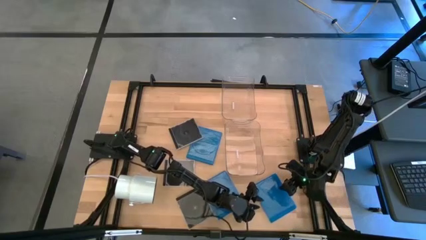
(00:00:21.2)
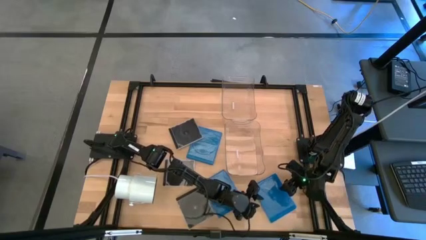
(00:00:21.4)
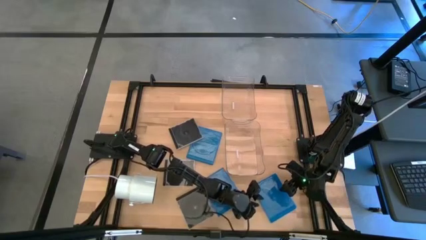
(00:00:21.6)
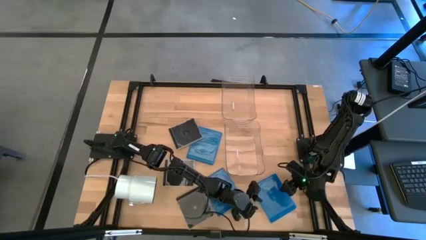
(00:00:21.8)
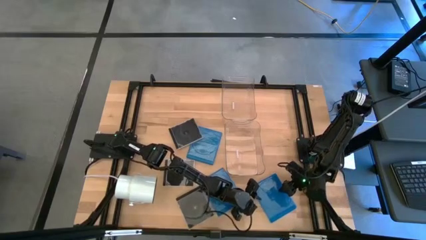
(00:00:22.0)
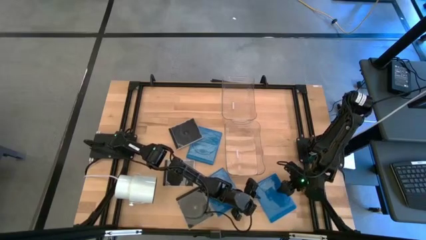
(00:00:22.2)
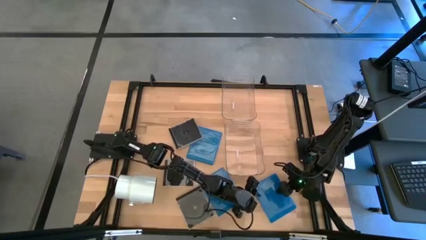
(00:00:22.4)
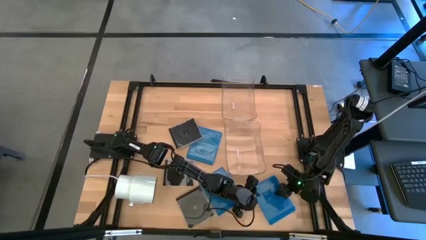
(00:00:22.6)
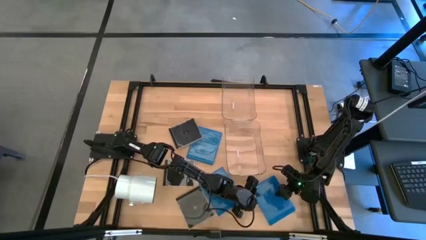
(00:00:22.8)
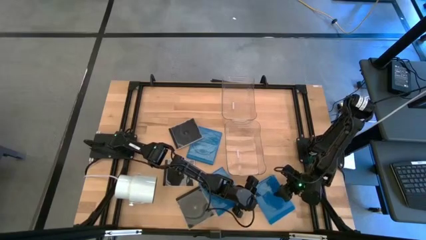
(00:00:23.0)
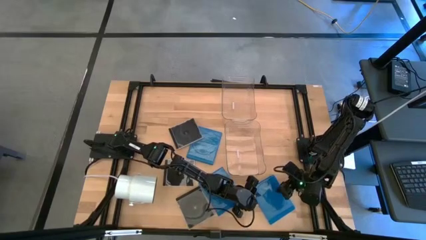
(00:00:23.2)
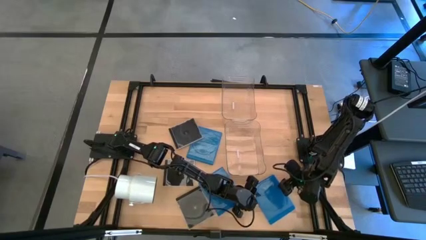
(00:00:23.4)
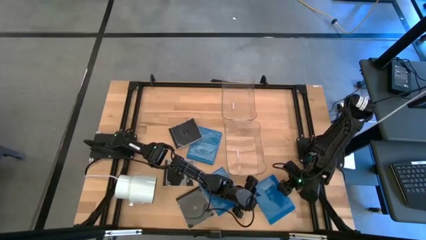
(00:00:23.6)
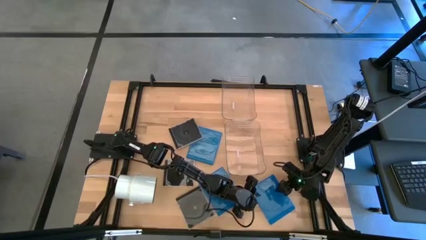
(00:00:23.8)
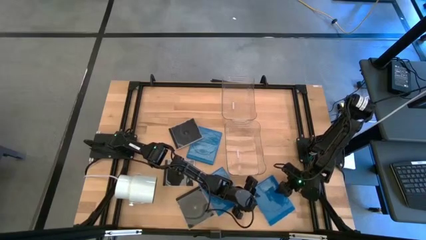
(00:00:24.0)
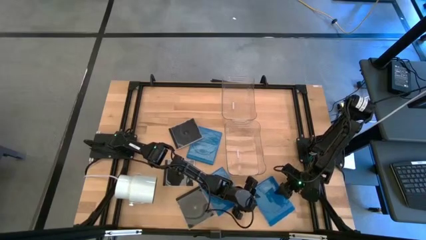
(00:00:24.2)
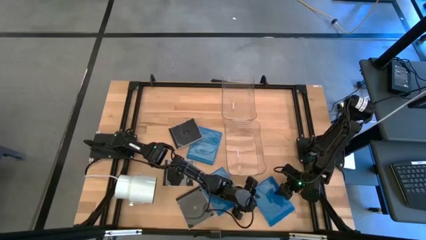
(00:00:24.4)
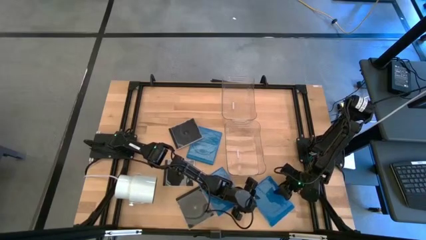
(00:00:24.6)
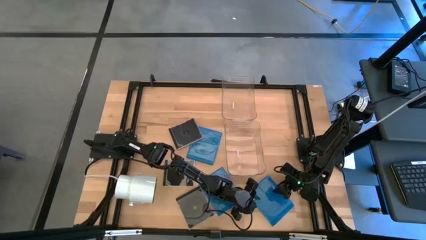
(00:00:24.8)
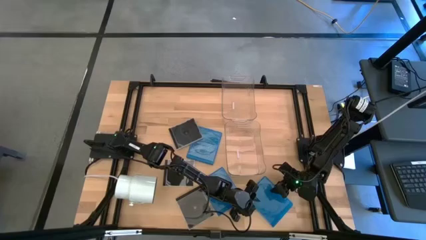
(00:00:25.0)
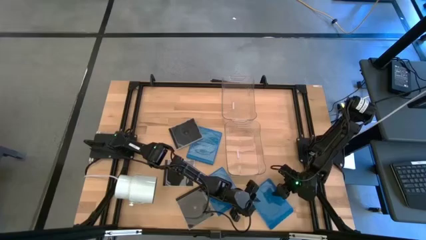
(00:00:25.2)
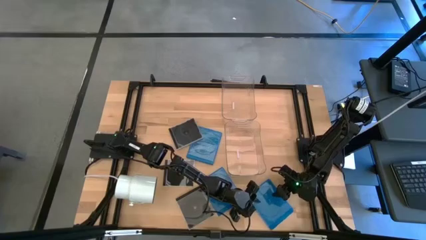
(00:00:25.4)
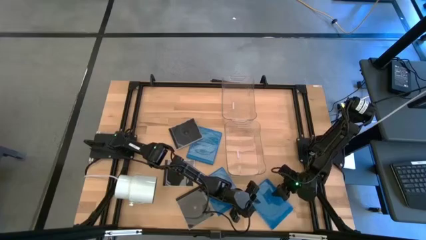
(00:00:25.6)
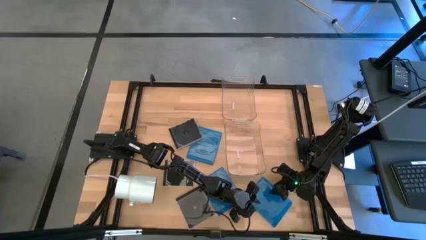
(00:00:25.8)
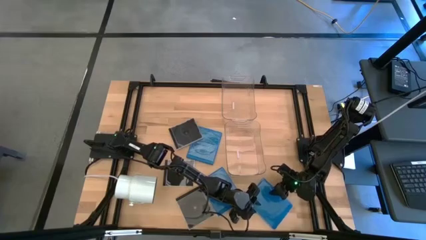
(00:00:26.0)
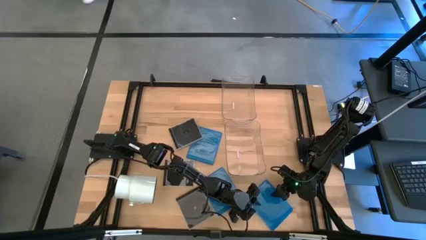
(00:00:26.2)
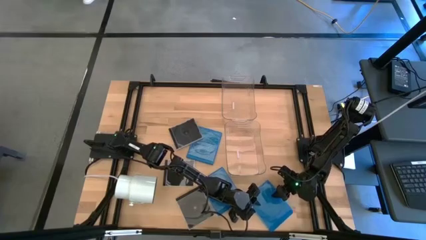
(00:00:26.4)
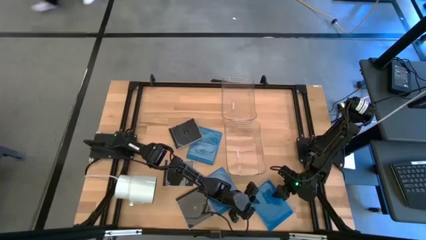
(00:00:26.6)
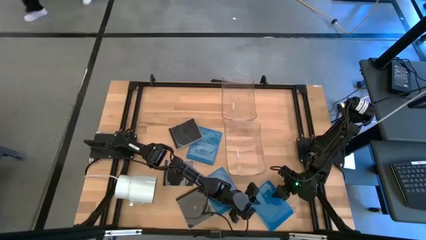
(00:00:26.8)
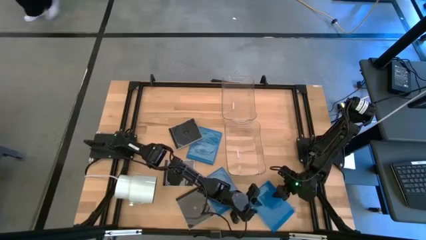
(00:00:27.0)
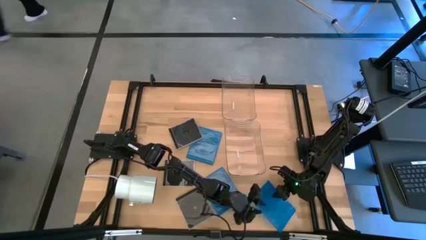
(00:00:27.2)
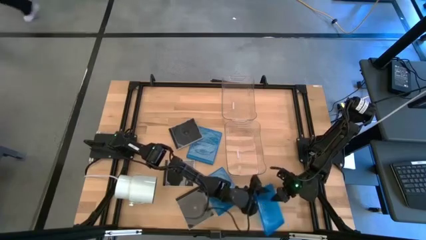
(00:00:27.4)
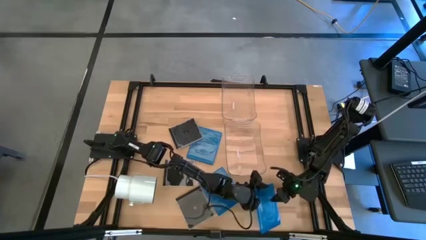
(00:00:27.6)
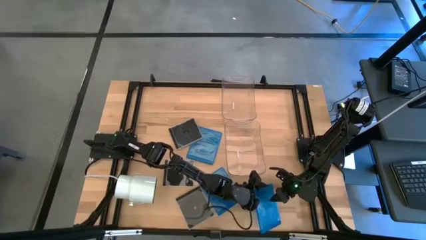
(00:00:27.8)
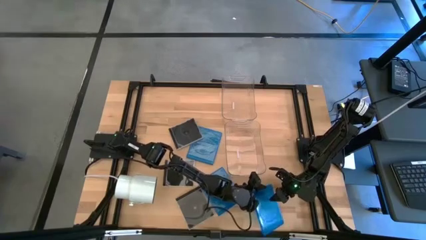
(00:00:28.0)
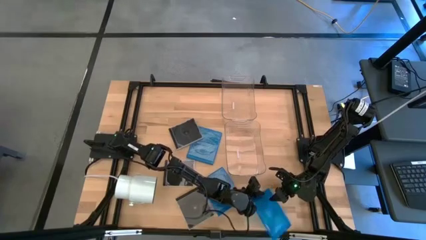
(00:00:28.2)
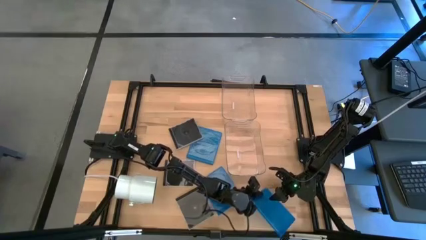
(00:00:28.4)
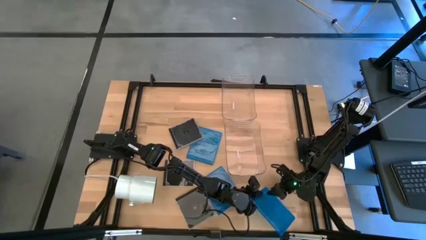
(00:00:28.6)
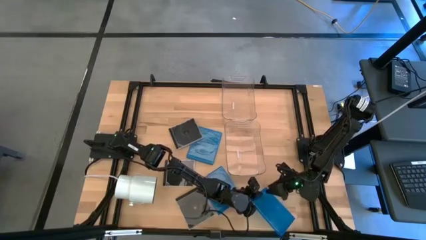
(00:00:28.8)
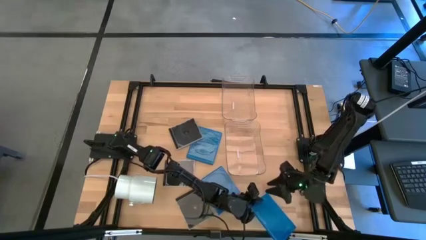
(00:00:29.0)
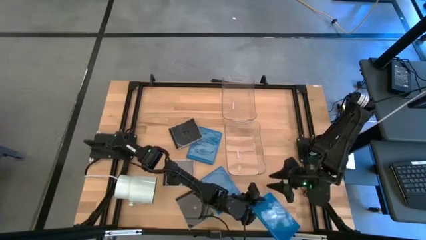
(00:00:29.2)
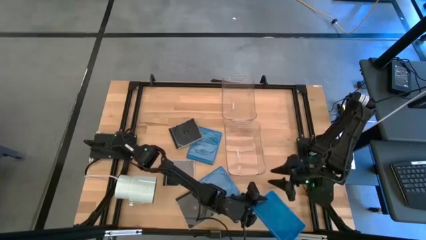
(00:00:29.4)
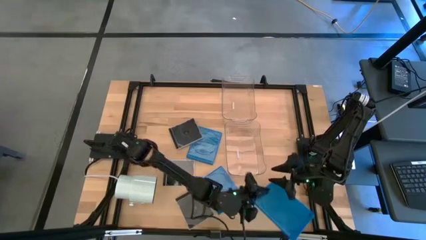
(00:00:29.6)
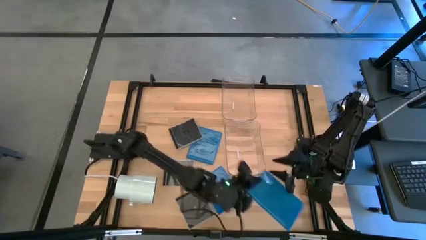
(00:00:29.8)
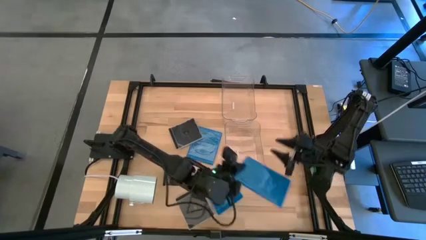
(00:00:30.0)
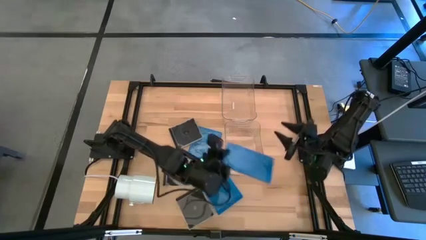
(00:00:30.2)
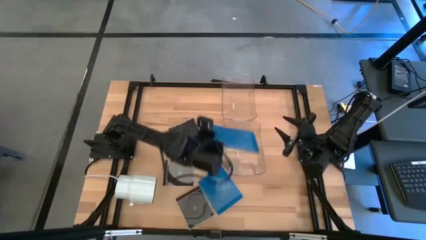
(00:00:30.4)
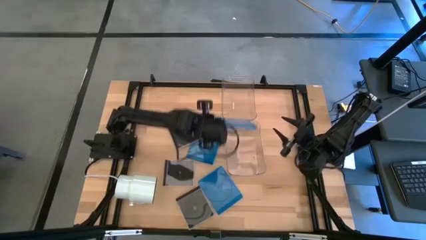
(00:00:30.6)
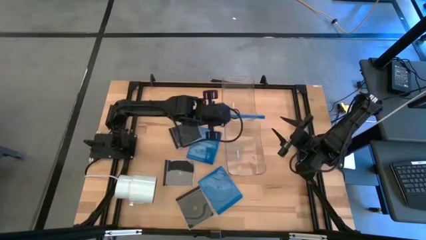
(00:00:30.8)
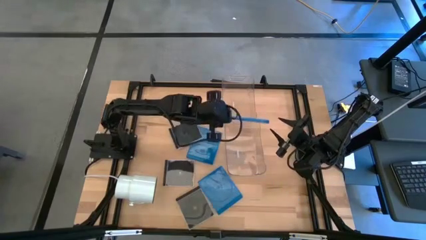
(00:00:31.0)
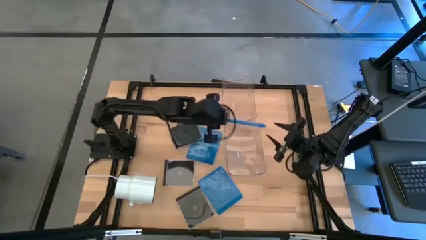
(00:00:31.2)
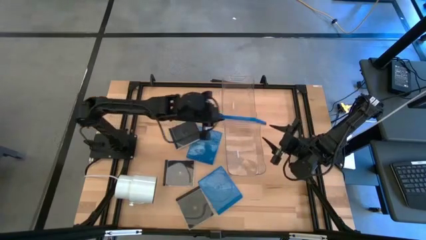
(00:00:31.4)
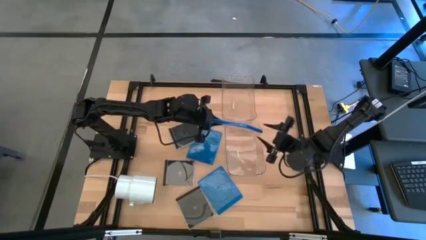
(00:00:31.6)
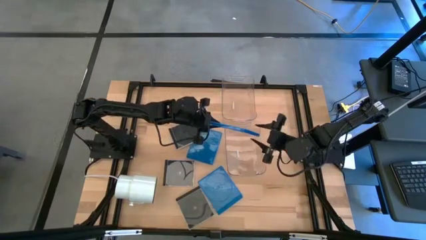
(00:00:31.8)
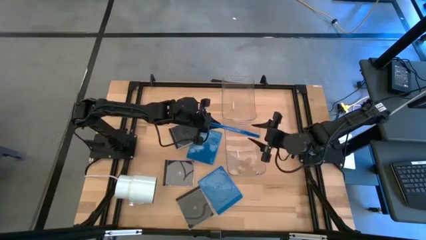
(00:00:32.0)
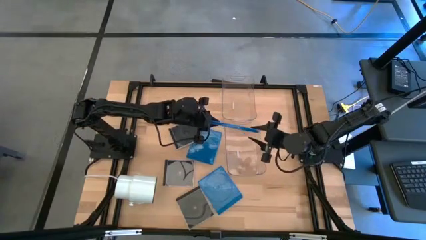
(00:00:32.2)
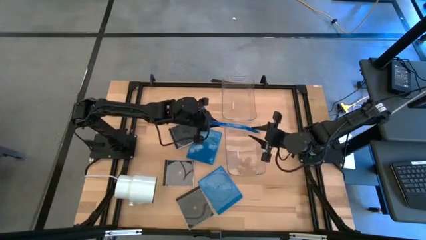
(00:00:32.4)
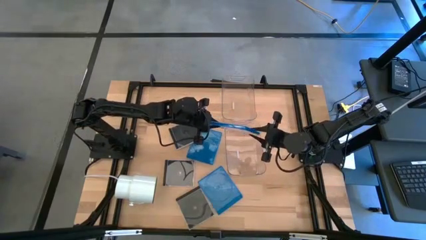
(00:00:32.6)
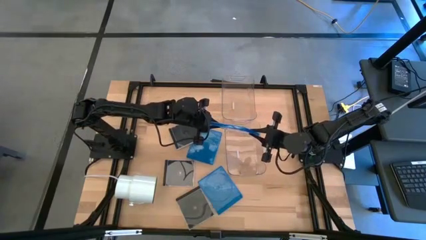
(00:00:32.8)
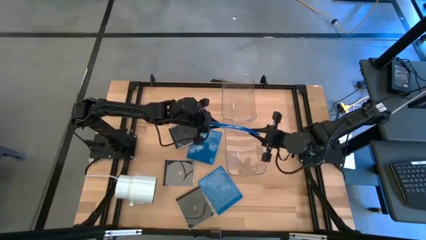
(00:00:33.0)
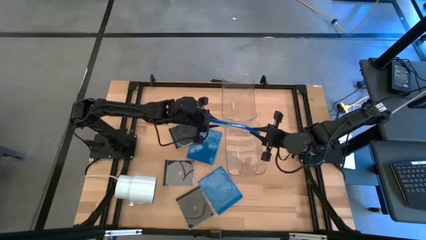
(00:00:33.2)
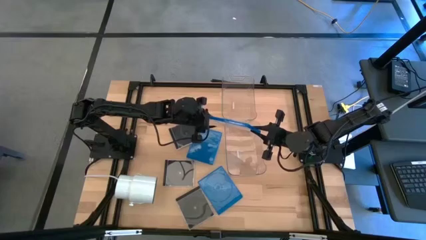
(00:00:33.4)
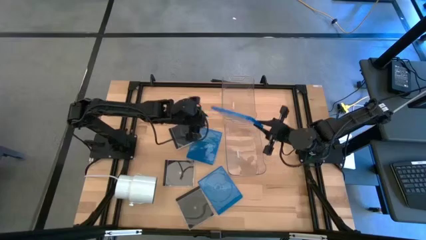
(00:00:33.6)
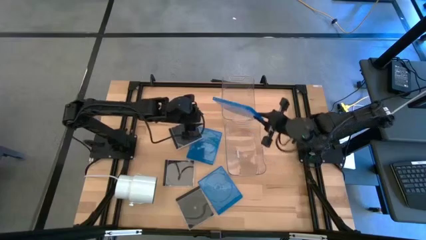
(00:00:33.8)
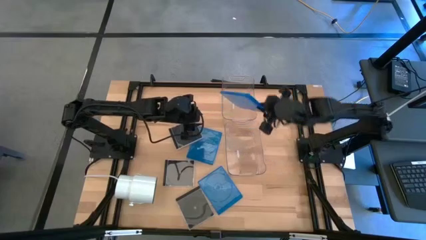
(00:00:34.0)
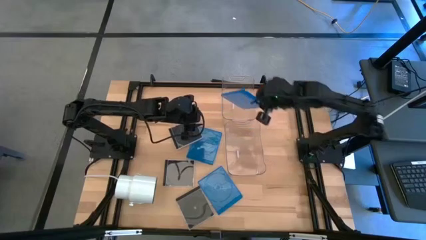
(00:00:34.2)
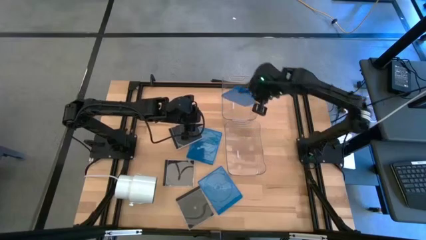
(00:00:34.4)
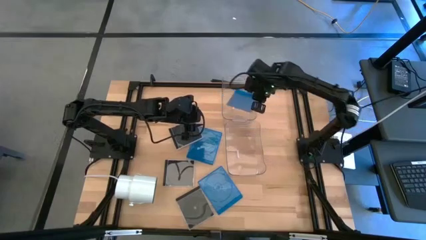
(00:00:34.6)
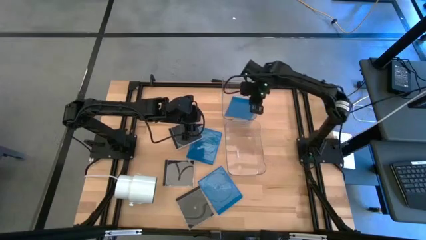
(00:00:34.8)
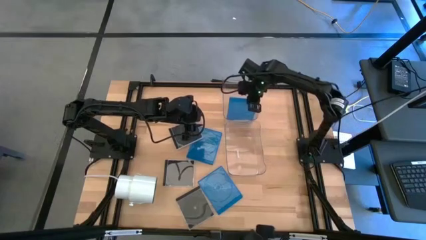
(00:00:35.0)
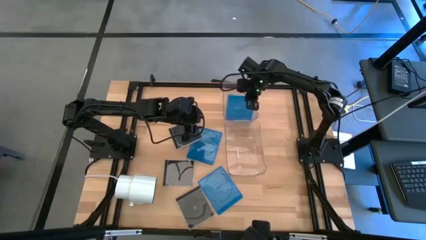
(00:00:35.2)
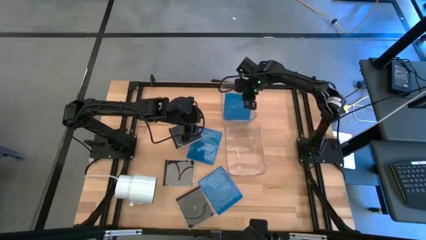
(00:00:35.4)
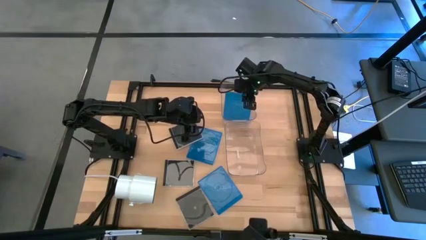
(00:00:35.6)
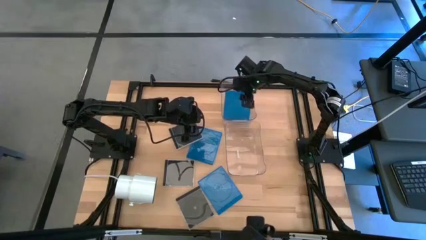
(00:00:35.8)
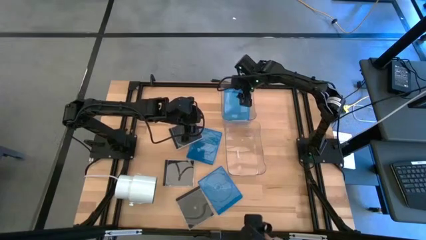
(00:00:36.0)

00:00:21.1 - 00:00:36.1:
Task: Pick & place jewel cases by type
Put the bottom right blue CD case into the top transparent bin
